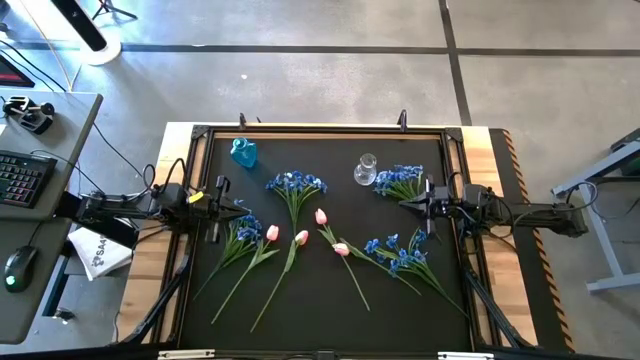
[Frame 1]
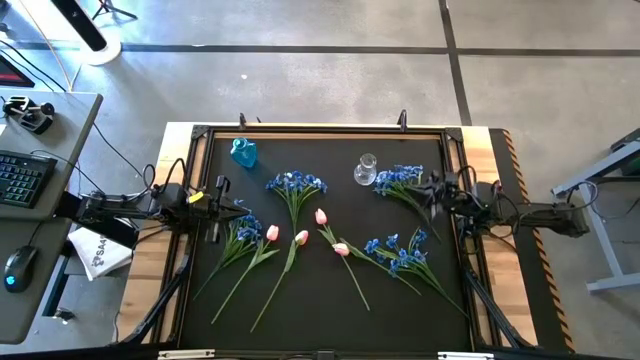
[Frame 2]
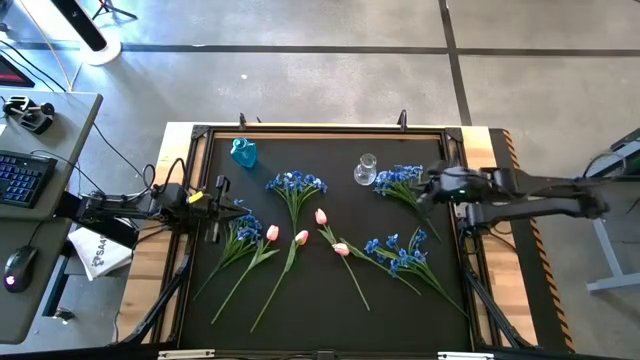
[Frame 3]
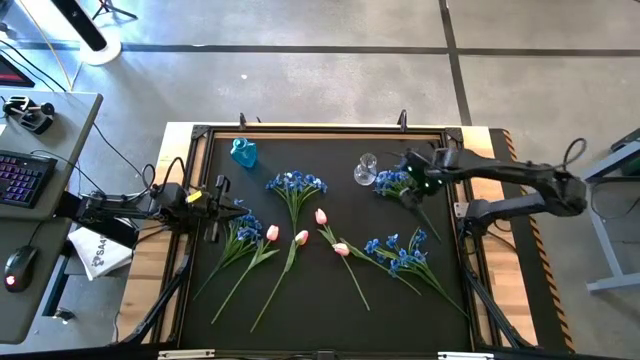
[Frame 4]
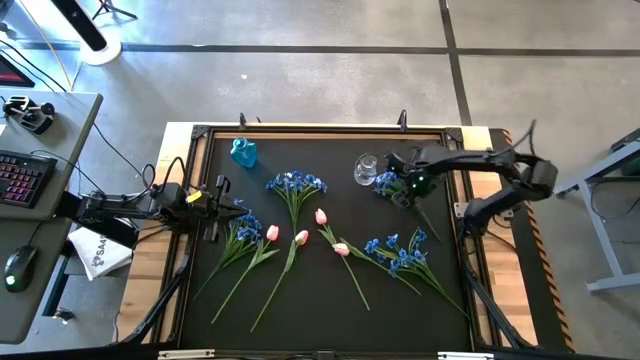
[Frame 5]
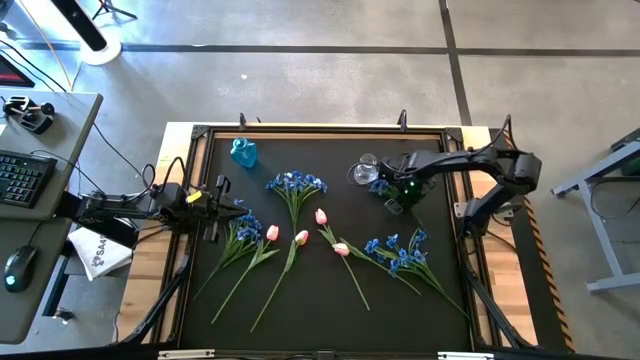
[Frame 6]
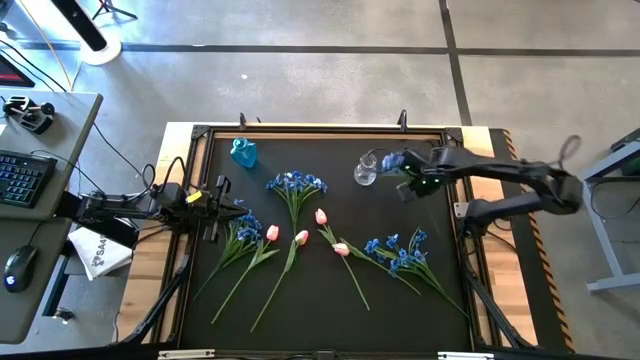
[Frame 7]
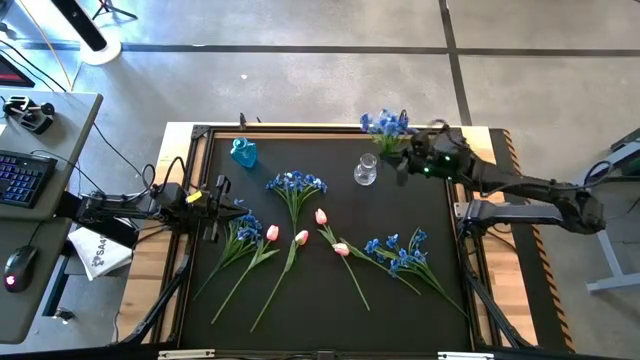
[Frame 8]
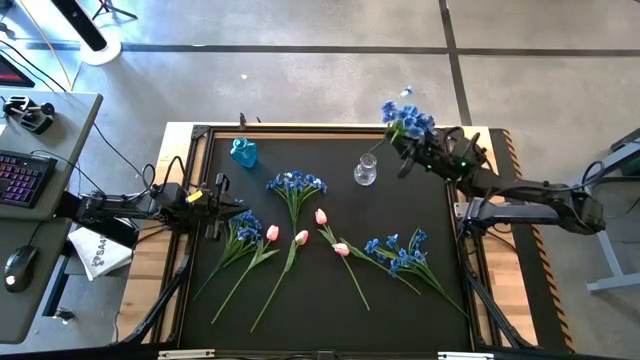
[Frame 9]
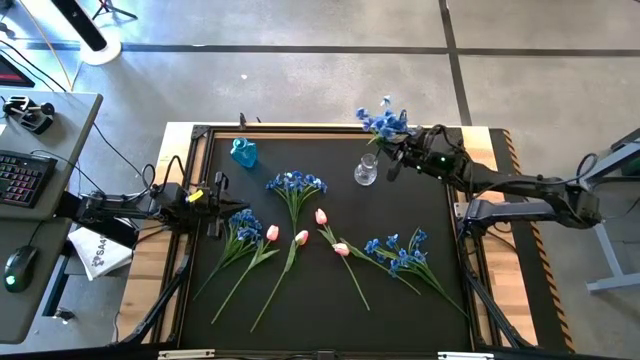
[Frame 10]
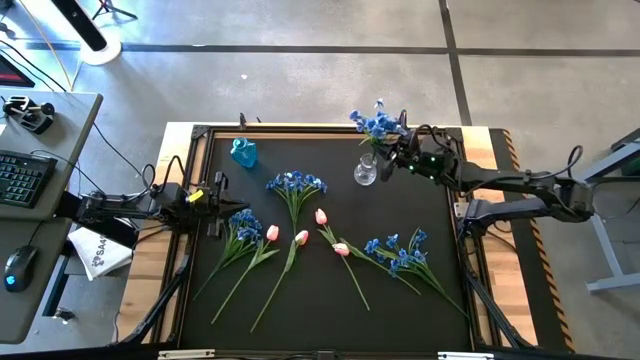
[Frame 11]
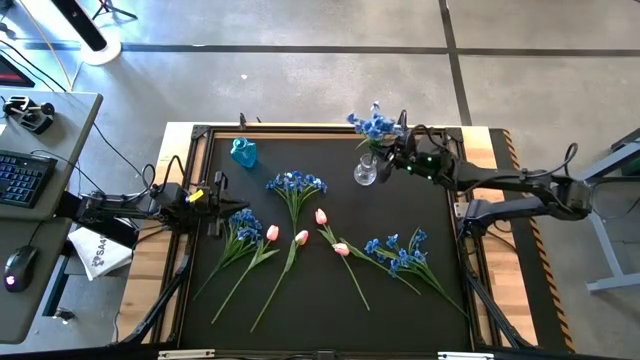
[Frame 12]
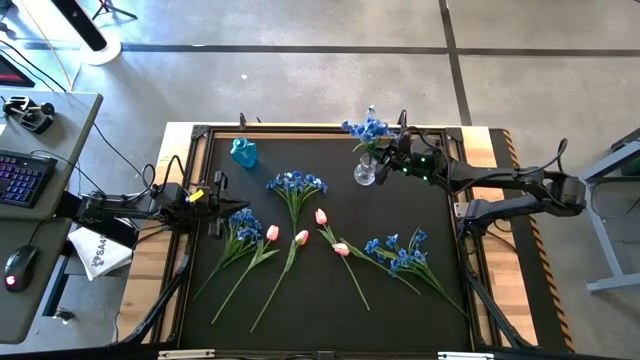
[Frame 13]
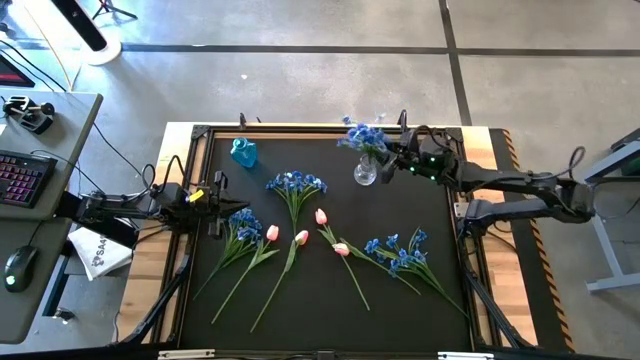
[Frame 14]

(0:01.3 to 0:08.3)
Task: Sort flowers into vase by color
Put the top right blue flower into the transparent vase

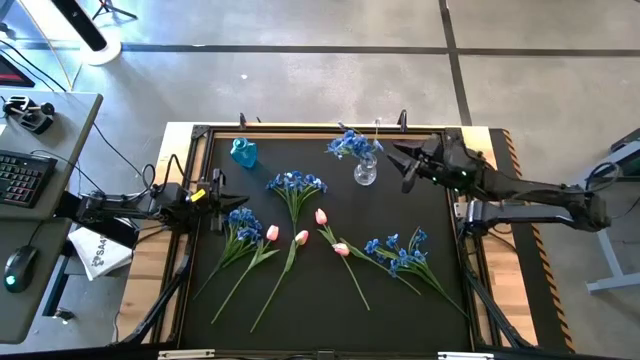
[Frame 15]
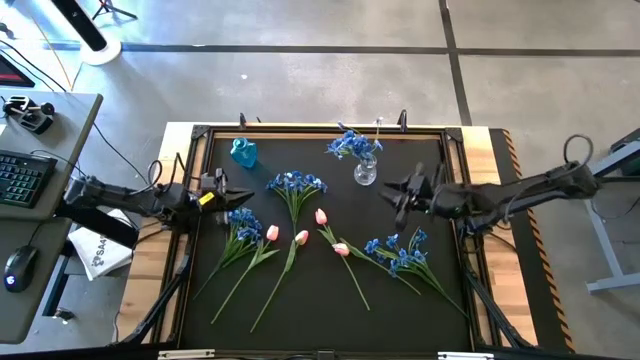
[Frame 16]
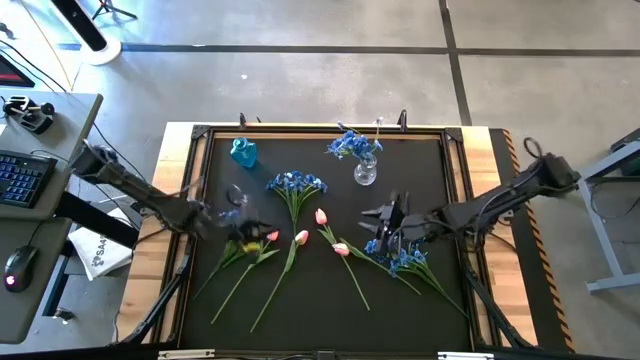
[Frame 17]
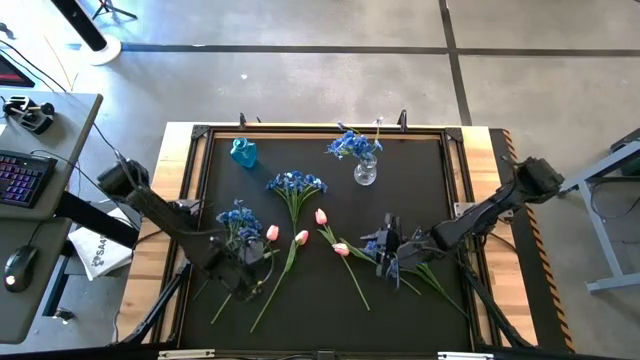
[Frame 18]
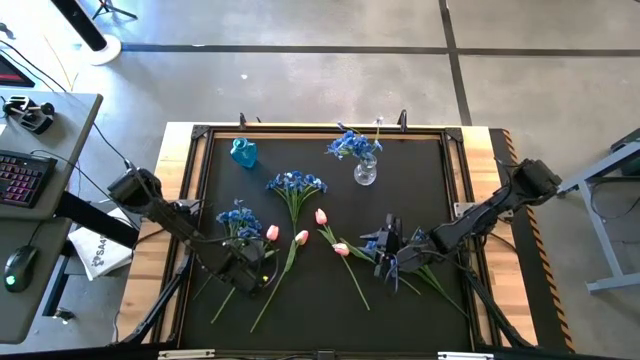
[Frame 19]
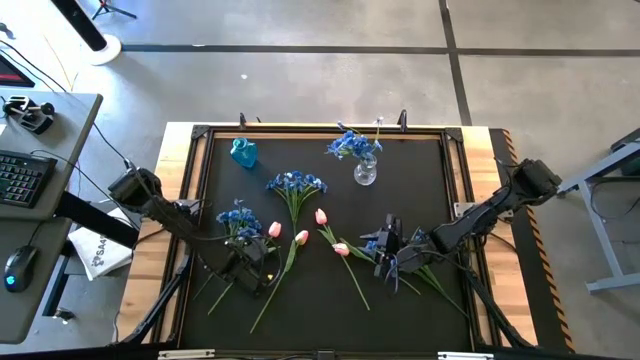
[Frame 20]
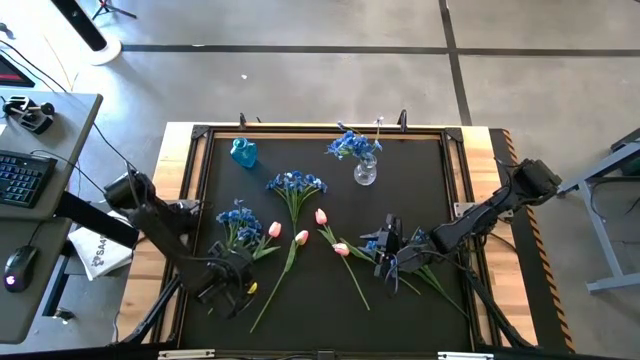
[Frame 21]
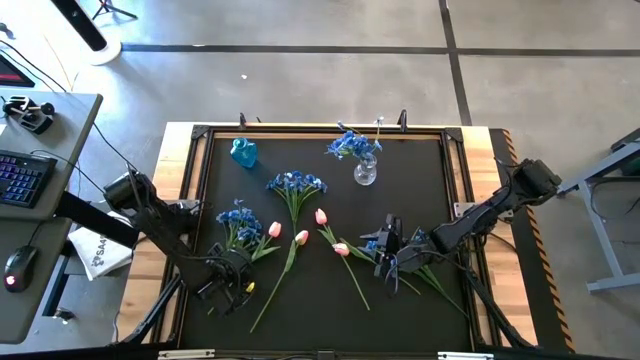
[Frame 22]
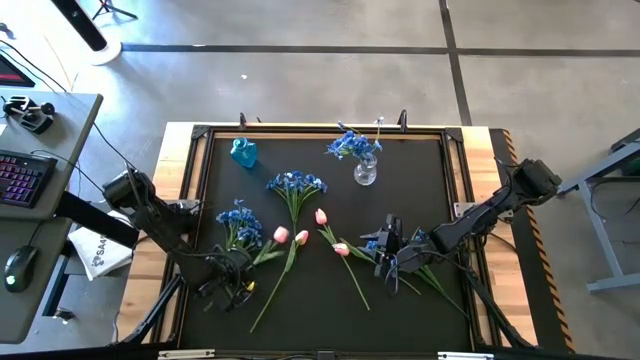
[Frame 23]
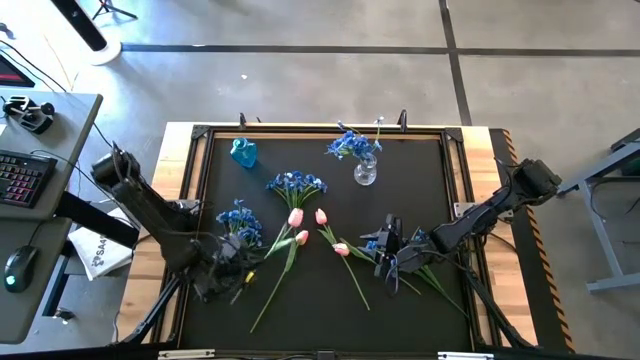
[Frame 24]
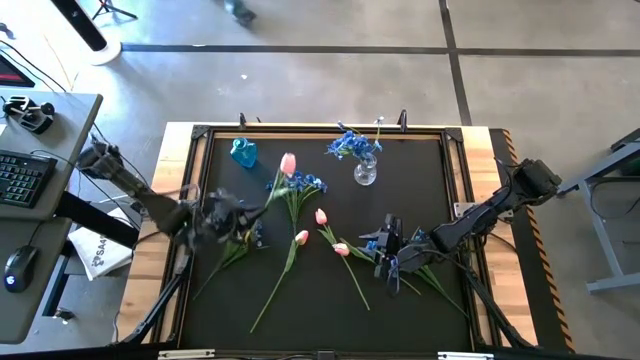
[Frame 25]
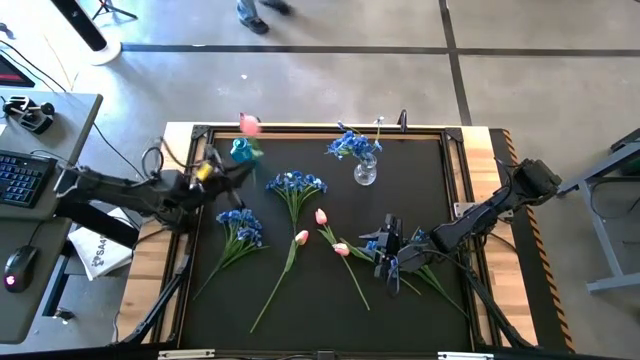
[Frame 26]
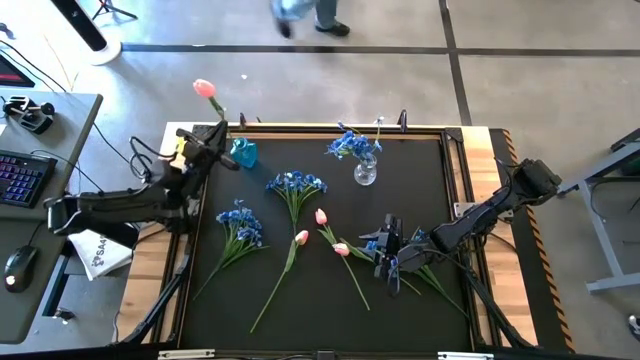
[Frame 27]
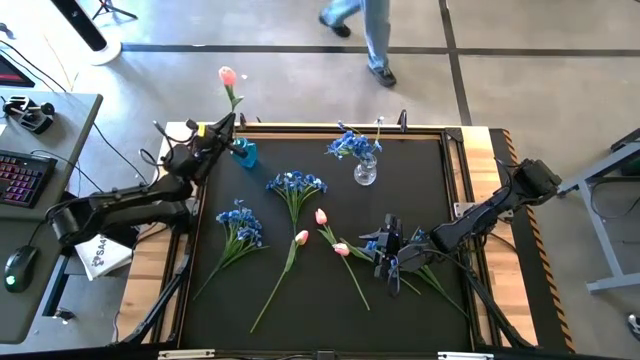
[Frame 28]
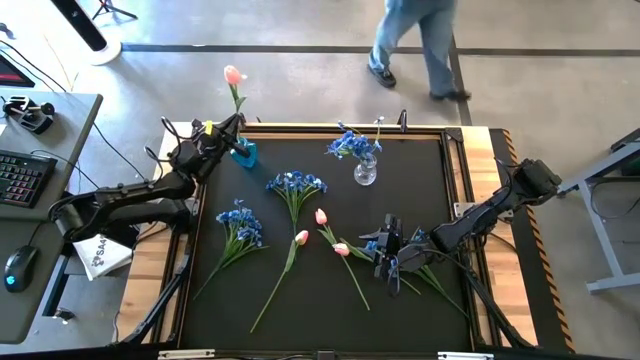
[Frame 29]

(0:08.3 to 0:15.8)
Put the left pink flower into the blue vase

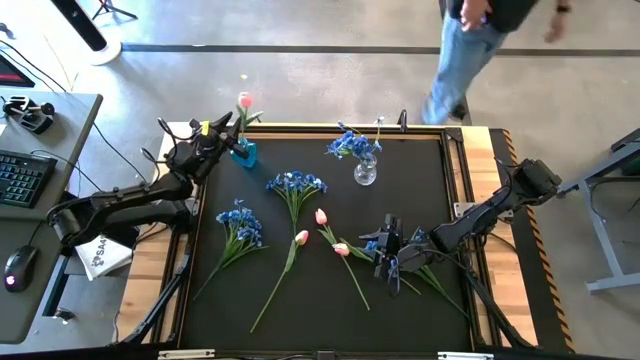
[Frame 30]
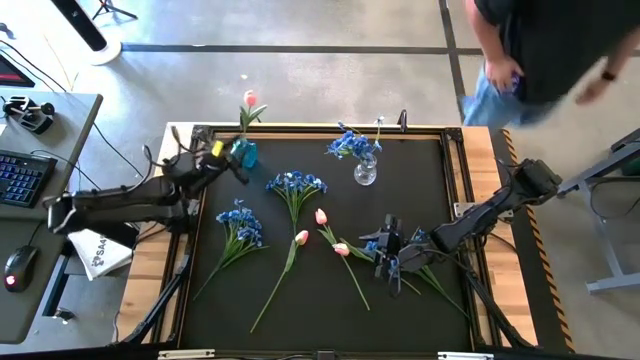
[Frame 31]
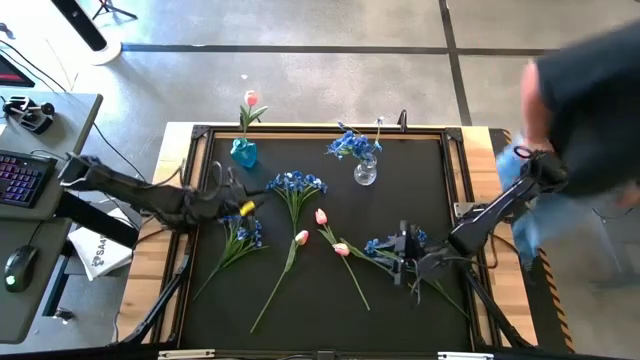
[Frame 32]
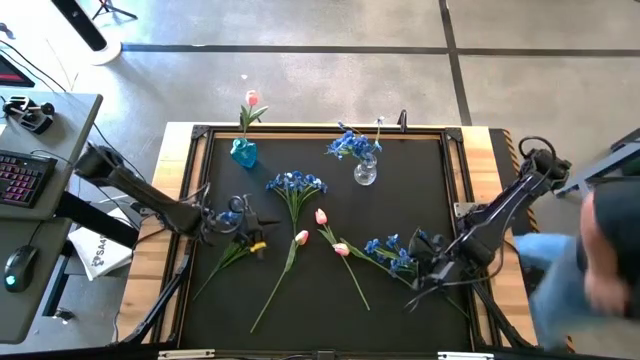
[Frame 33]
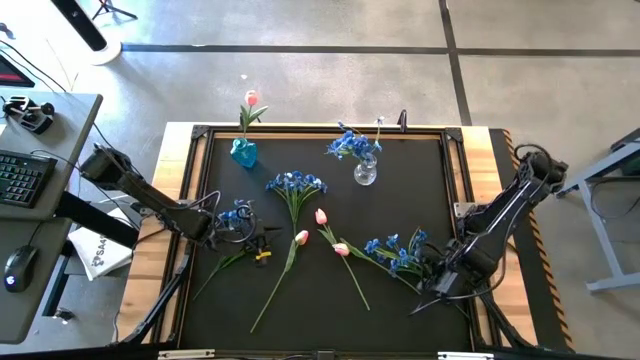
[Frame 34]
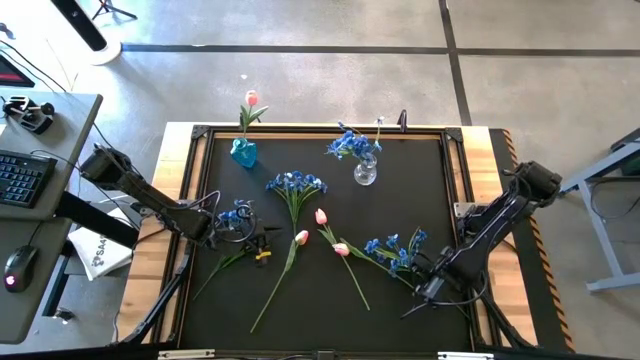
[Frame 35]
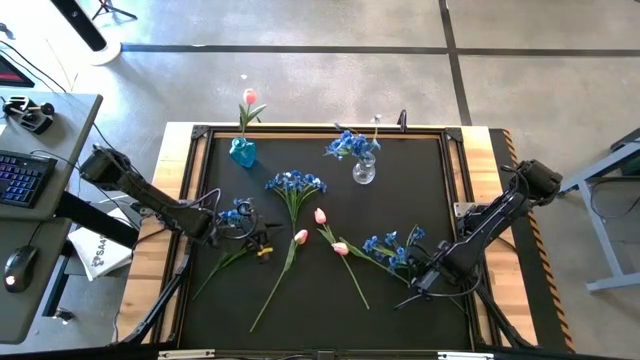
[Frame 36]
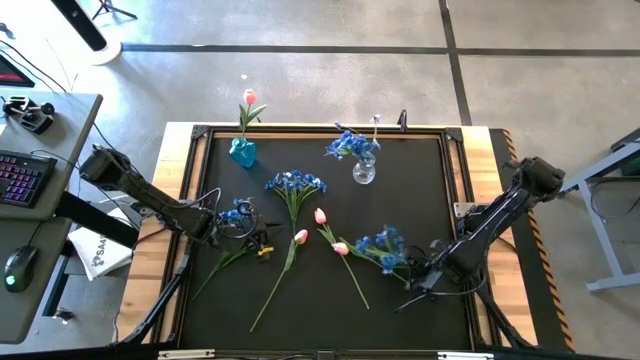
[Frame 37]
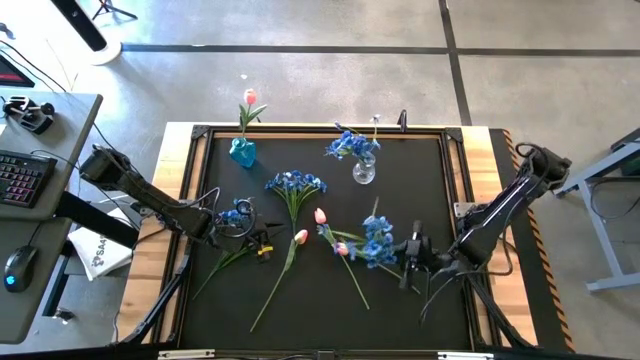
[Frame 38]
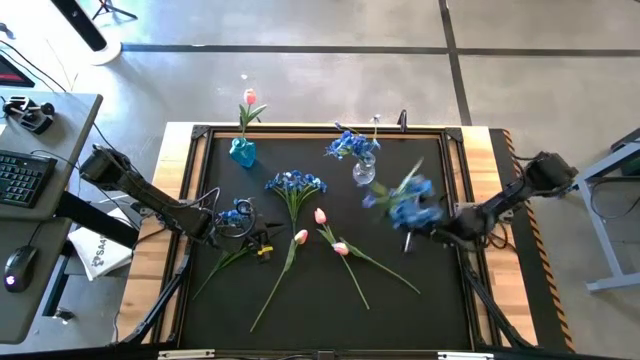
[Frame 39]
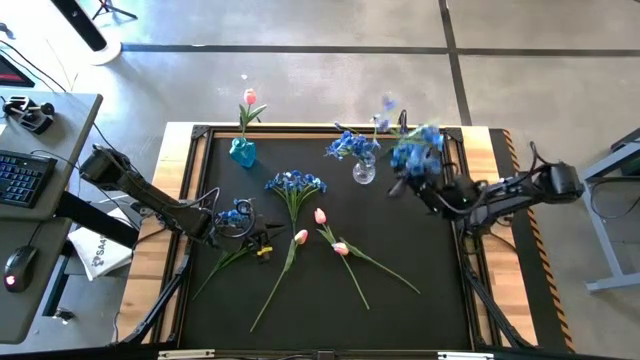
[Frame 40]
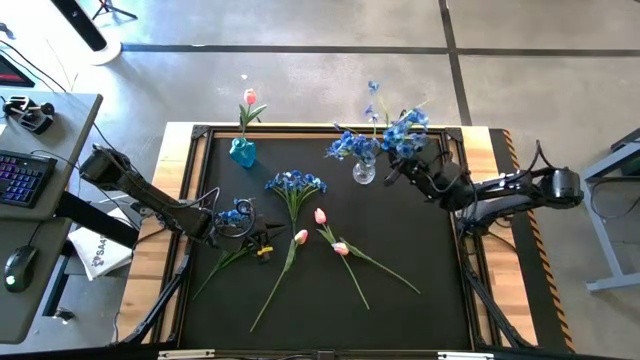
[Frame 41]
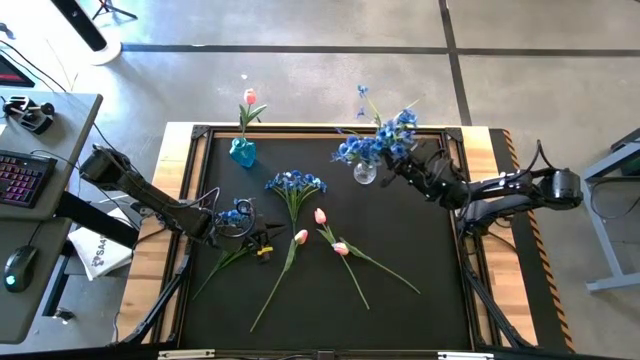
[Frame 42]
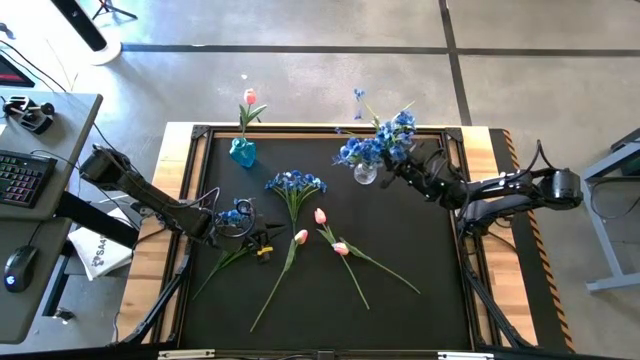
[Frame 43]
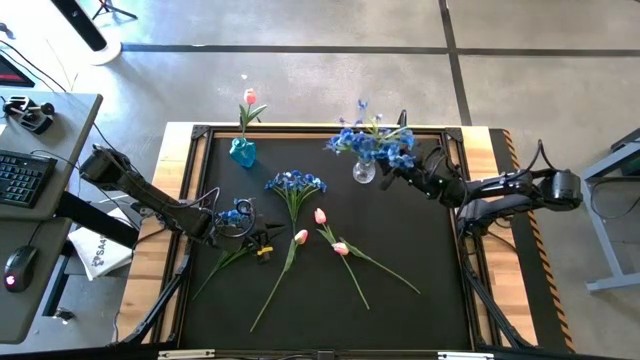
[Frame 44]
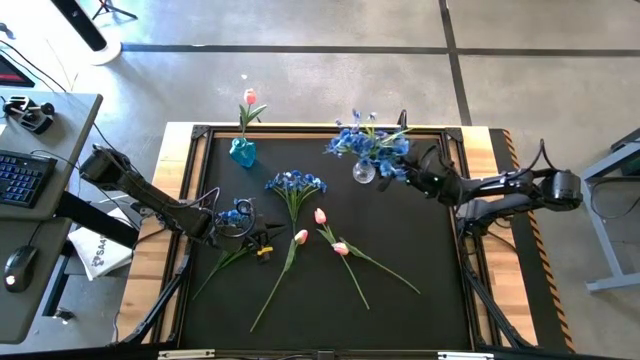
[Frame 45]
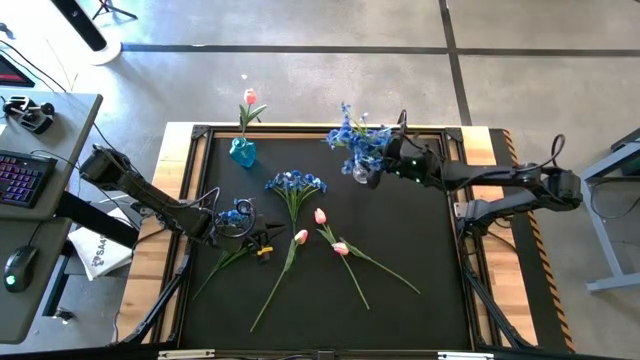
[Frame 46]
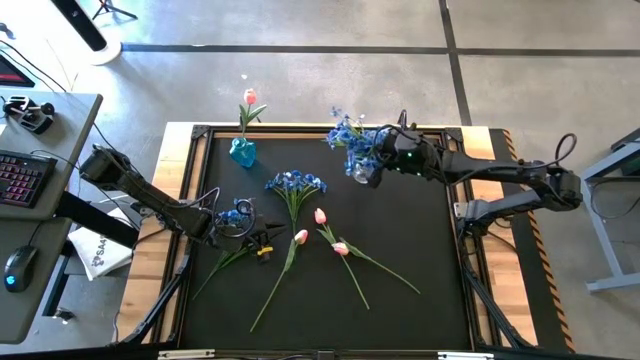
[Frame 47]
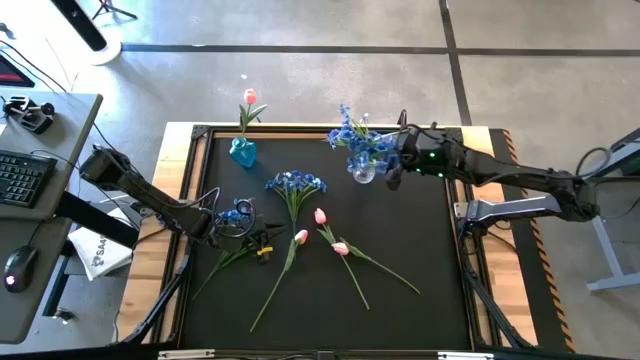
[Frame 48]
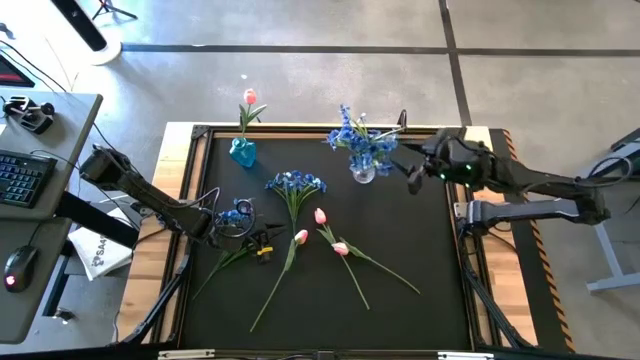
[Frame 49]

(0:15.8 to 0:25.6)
Put the right blue flower into the transparent vase
